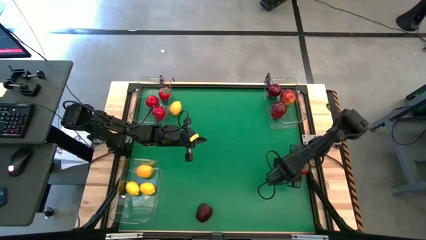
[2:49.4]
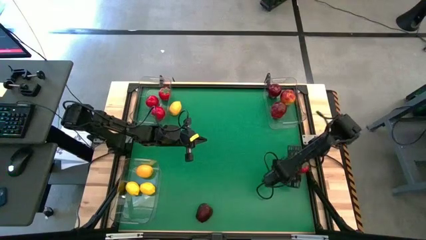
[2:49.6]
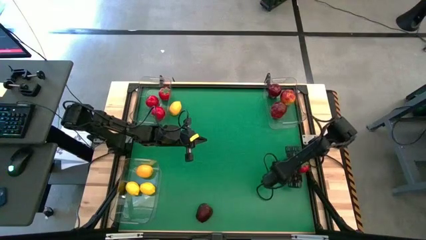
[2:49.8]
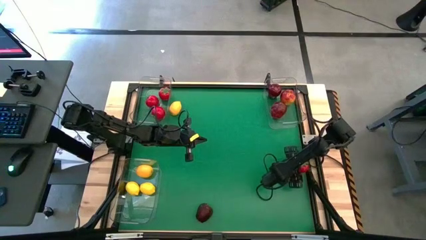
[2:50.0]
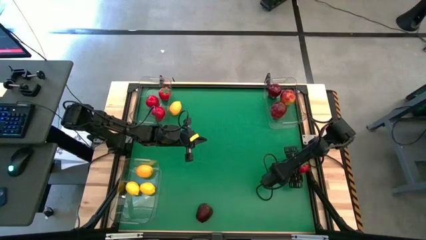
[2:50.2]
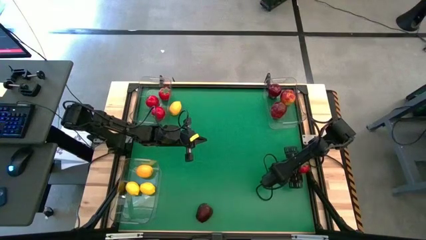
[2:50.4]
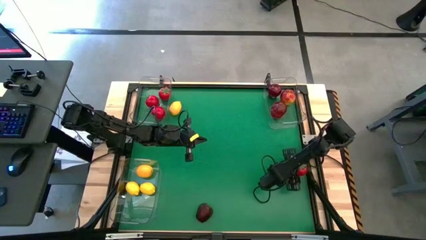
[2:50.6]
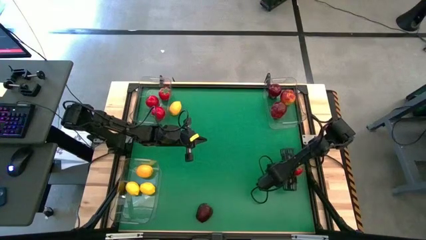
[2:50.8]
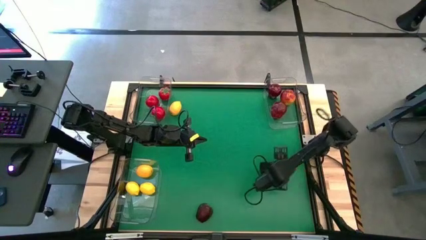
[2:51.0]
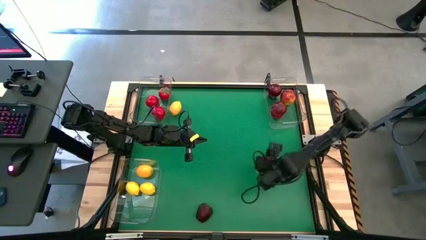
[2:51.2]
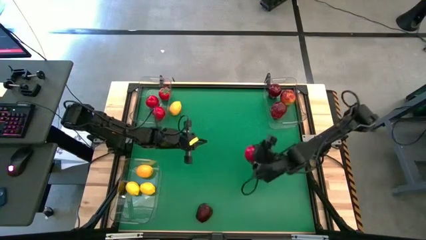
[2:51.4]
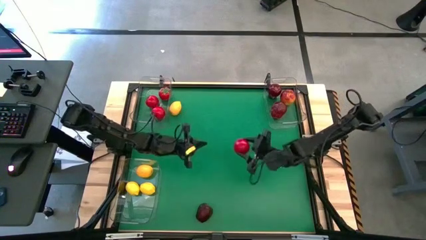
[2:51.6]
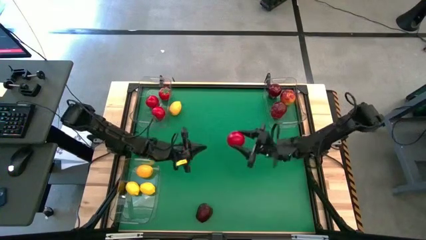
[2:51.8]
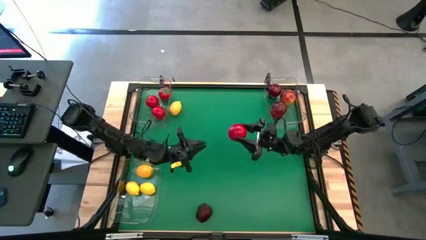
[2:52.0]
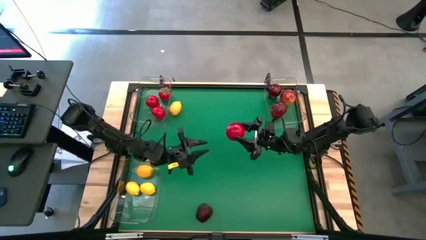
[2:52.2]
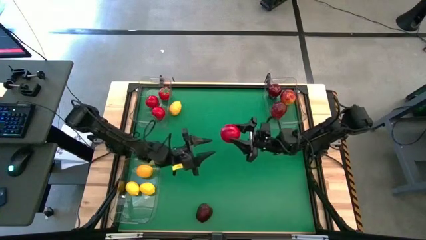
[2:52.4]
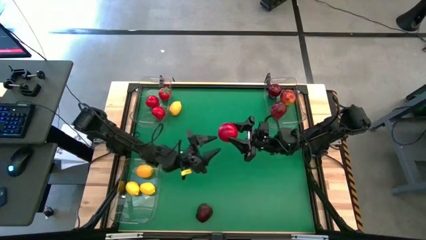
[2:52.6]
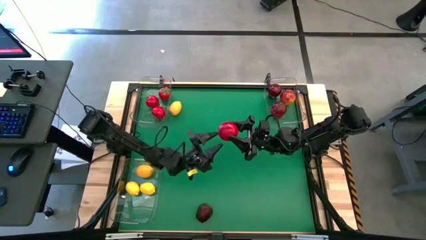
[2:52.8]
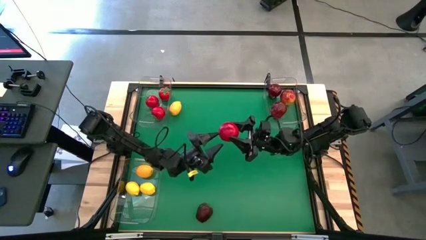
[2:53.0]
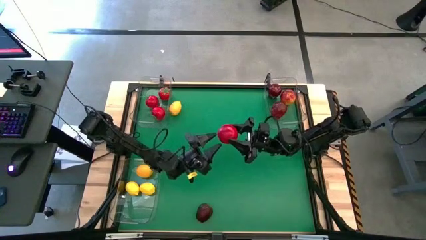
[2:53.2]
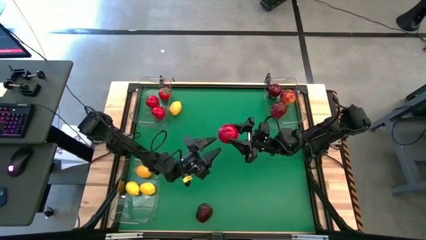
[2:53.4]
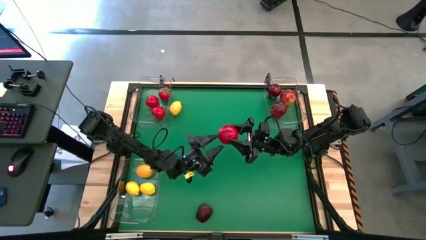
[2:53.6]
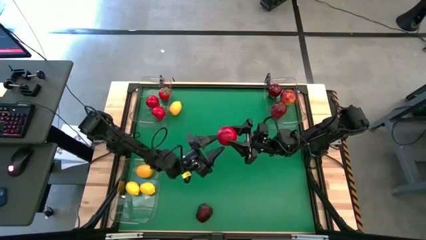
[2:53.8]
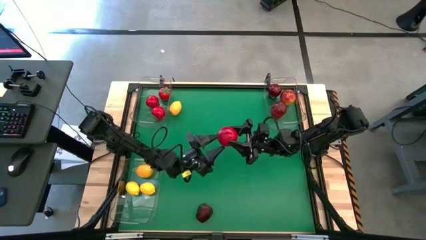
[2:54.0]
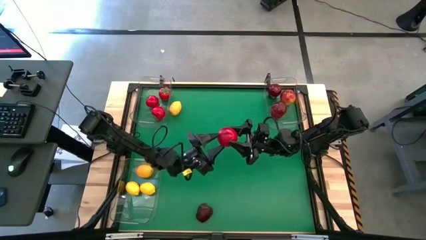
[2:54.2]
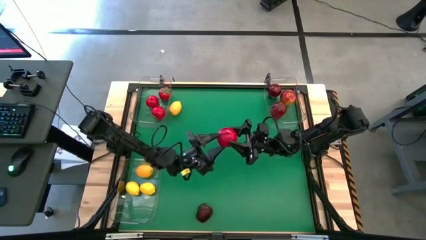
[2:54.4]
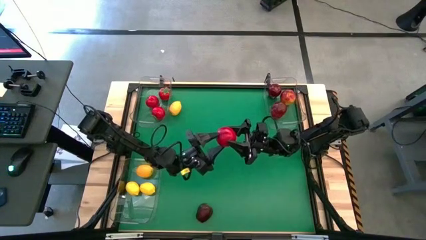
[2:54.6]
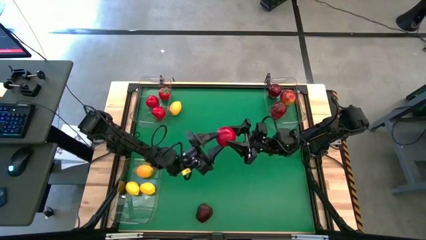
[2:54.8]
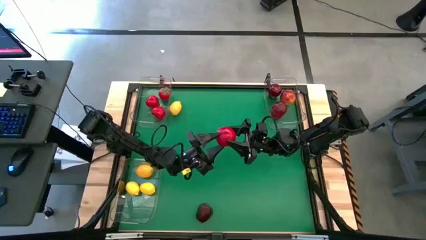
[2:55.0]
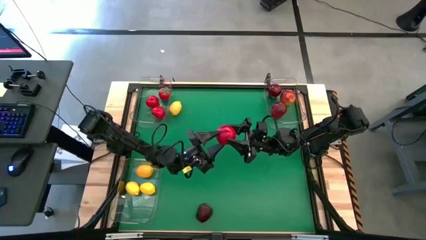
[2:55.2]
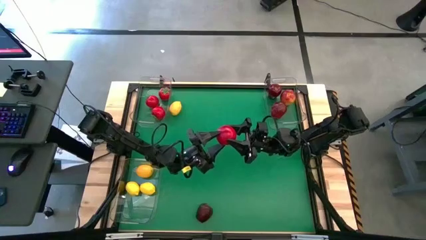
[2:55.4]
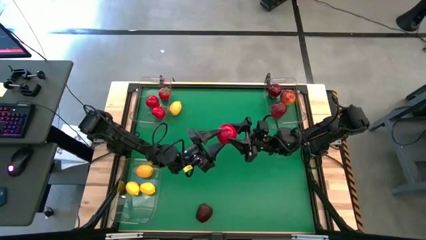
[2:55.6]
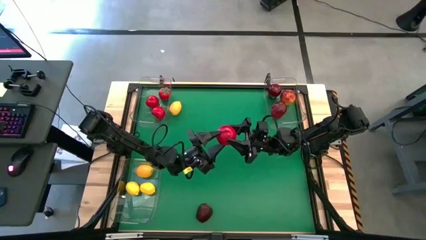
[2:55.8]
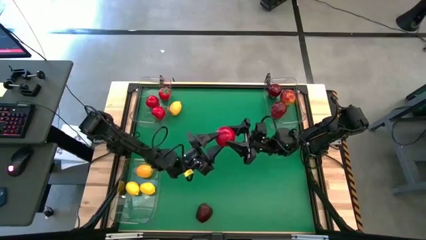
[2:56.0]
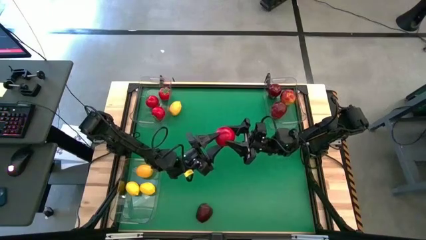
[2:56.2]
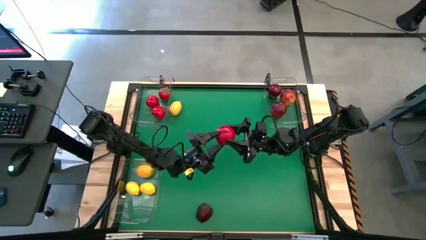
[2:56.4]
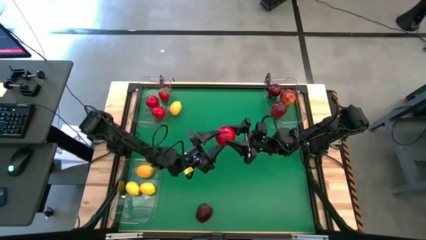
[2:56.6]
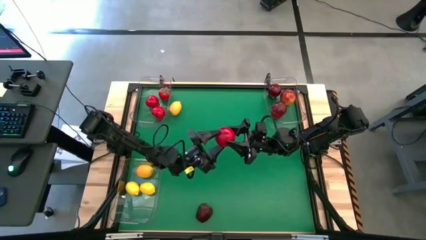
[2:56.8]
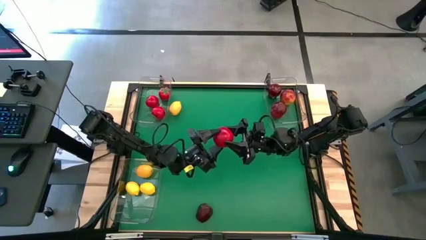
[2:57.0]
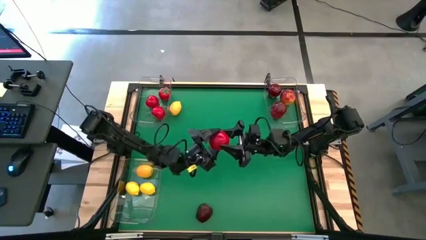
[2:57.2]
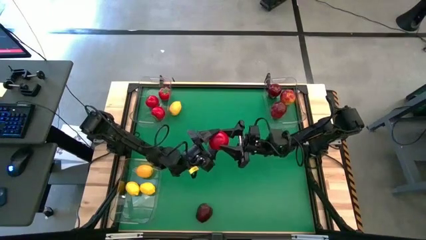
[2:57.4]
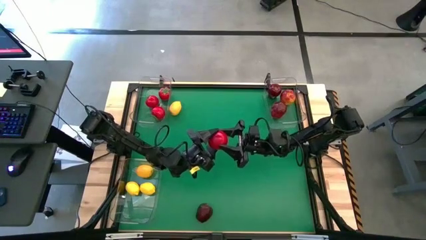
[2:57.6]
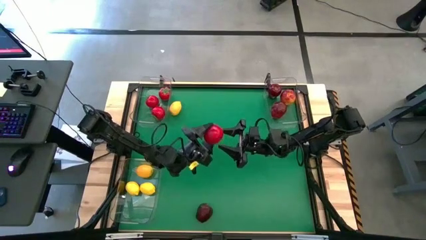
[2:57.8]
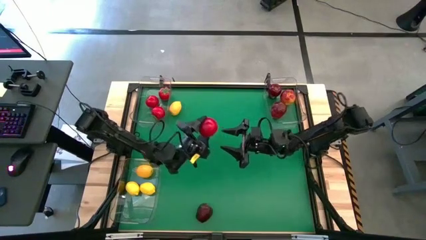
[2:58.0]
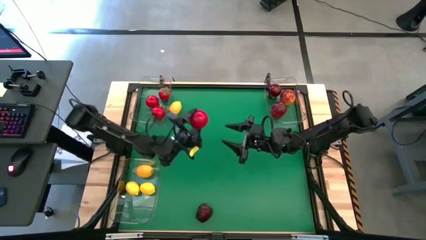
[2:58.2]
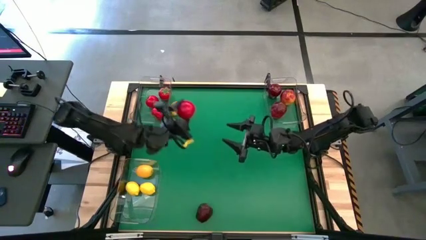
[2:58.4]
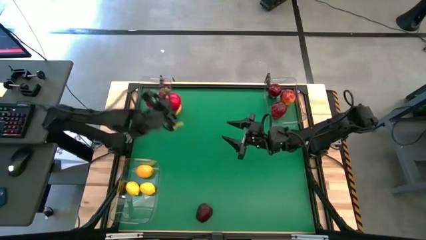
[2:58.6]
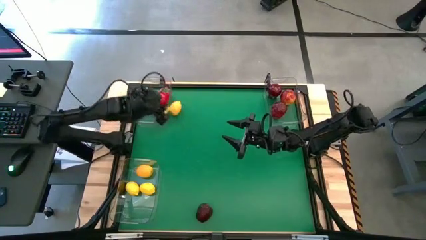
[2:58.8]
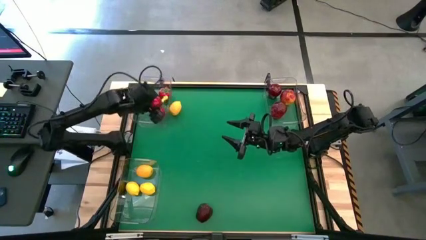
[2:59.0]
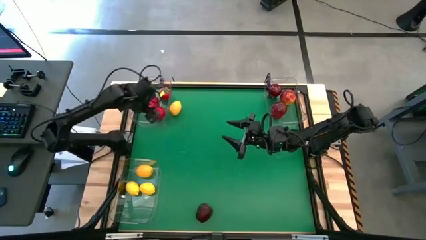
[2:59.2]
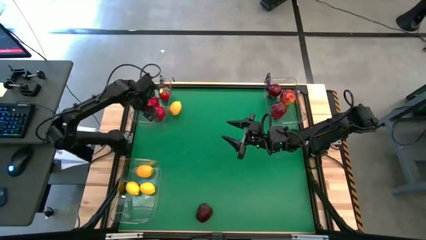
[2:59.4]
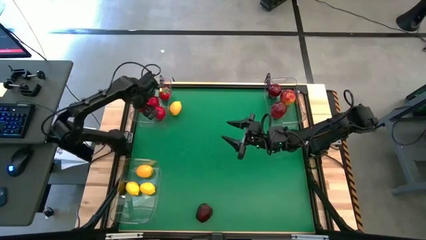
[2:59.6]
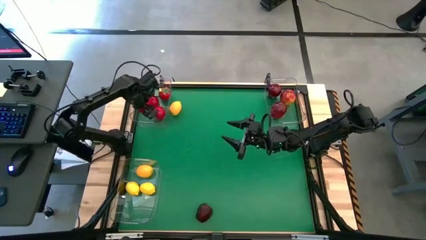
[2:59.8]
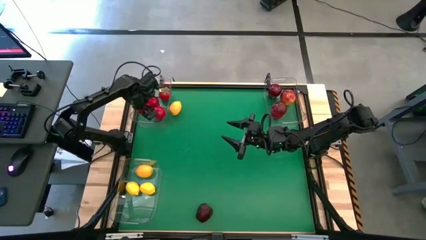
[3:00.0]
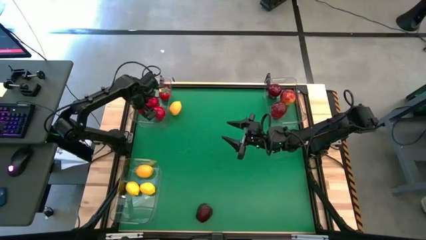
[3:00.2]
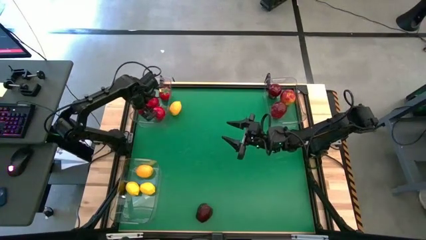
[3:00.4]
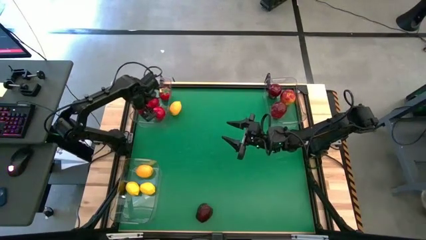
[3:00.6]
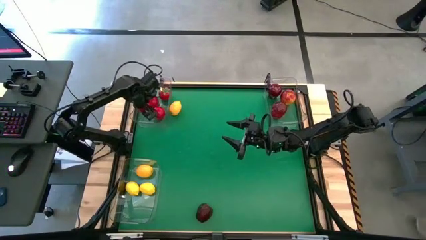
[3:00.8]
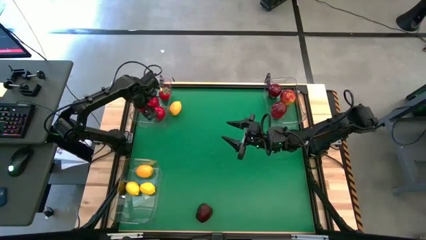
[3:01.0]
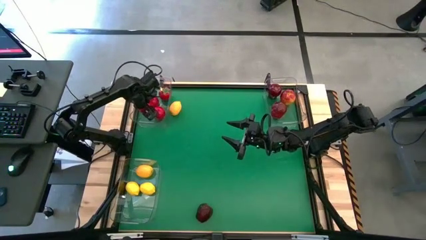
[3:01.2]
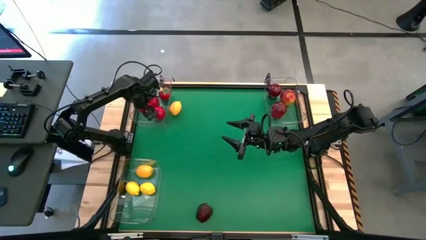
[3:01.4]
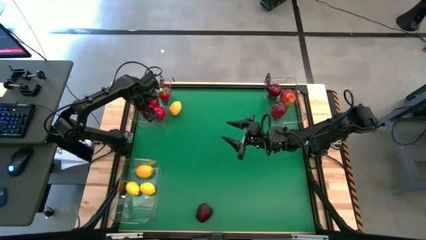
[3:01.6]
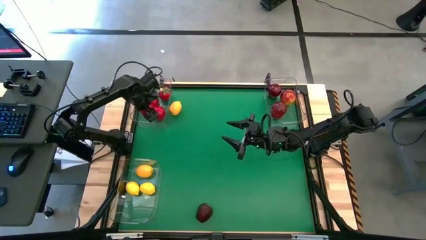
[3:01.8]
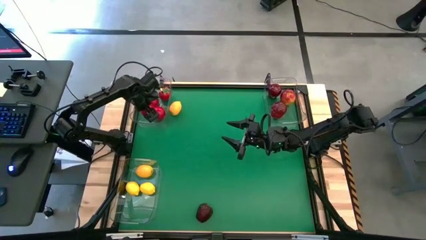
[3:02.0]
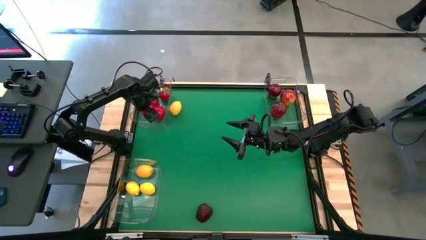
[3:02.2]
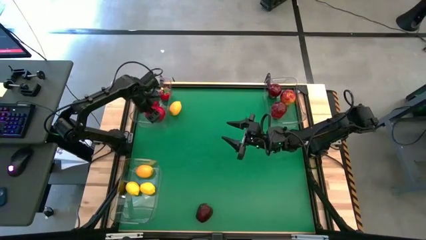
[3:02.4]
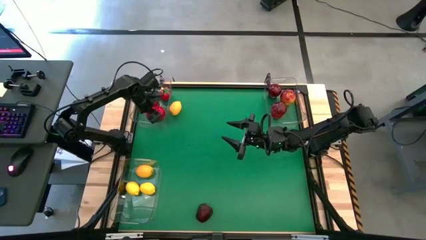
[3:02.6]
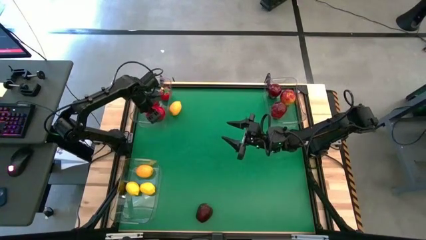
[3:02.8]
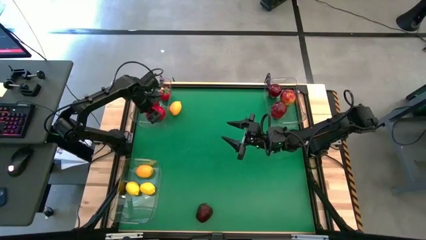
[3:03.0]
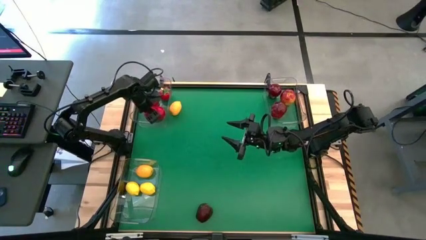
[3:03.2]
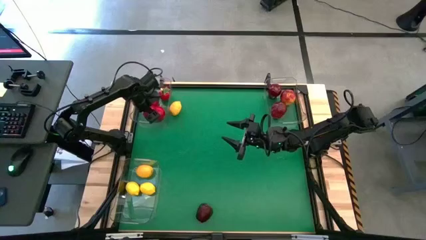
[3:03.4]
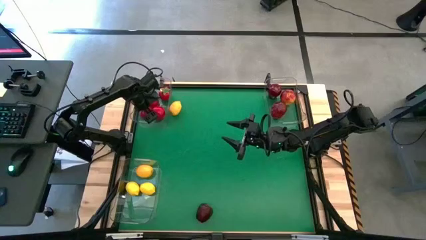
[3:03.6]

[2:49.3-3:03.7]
Task: Sort produce into baskets
Put the tomato into the top left bin

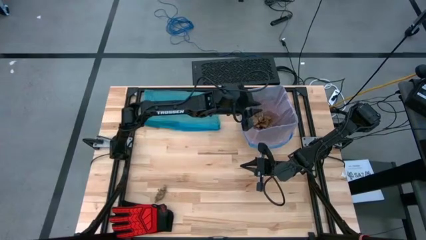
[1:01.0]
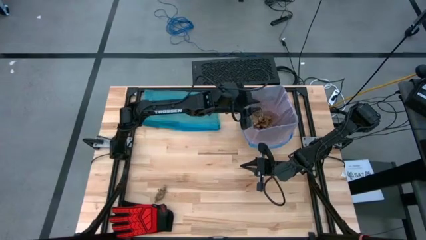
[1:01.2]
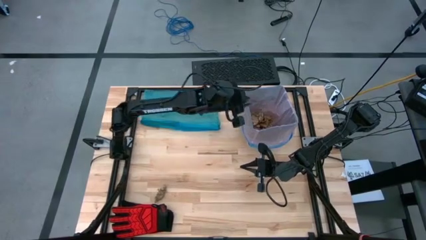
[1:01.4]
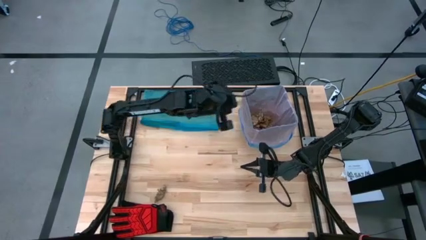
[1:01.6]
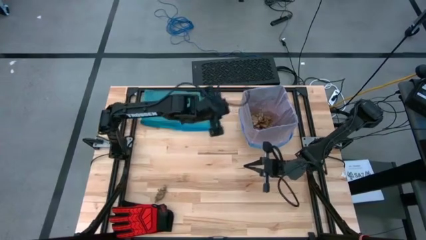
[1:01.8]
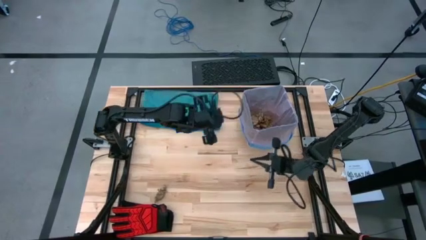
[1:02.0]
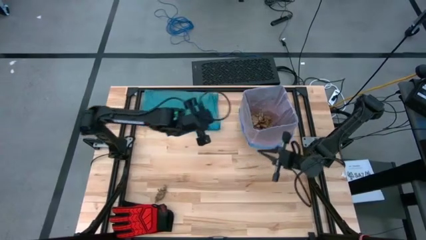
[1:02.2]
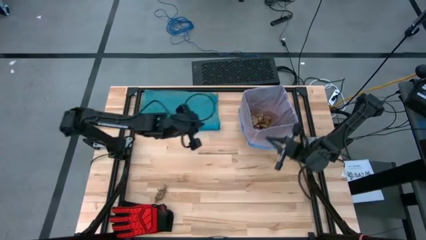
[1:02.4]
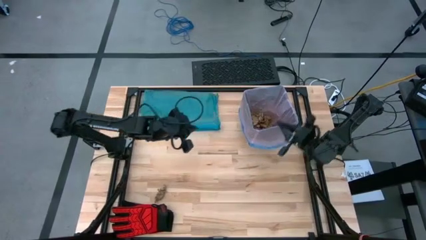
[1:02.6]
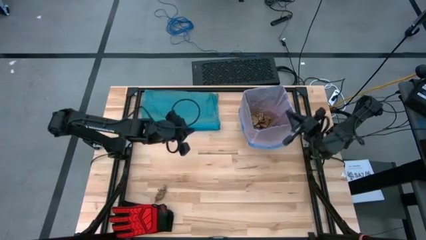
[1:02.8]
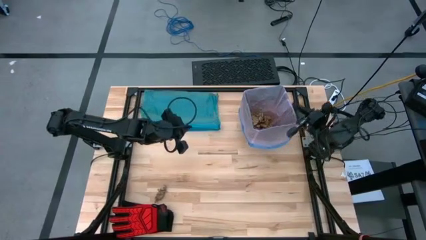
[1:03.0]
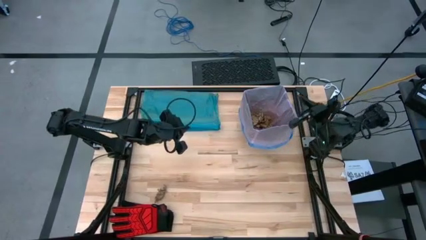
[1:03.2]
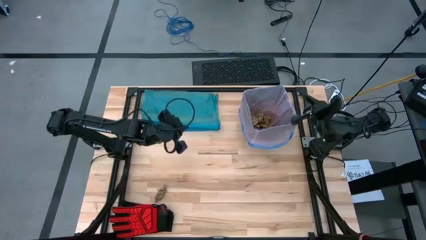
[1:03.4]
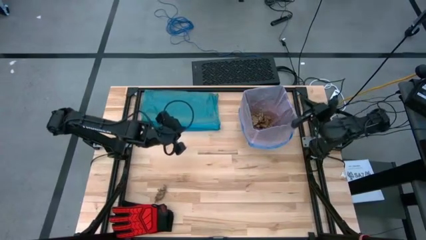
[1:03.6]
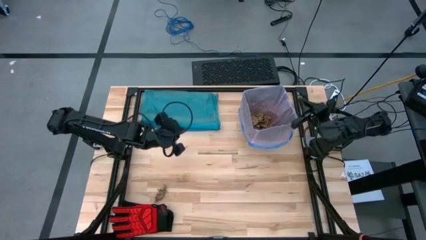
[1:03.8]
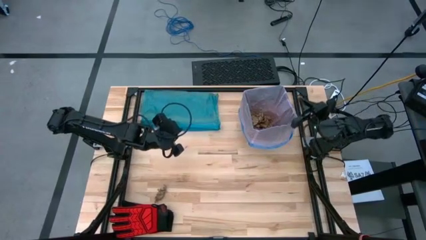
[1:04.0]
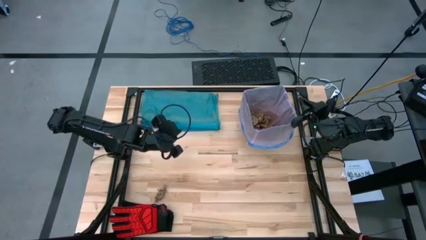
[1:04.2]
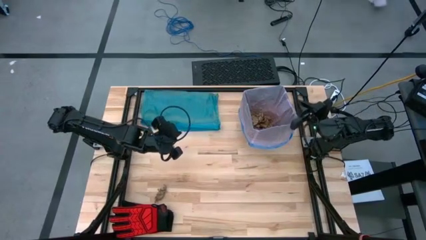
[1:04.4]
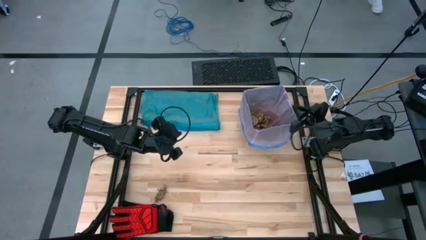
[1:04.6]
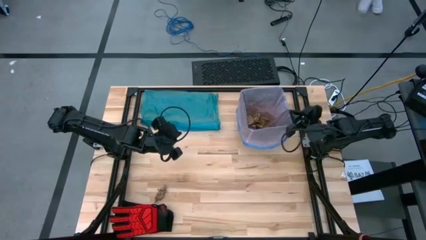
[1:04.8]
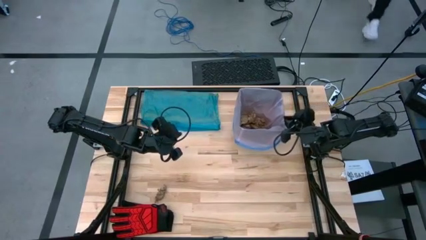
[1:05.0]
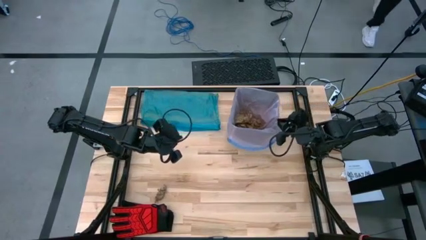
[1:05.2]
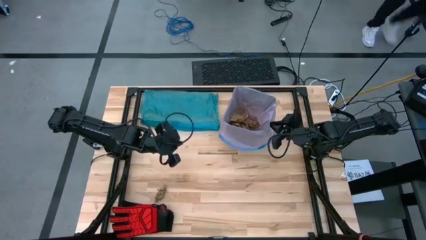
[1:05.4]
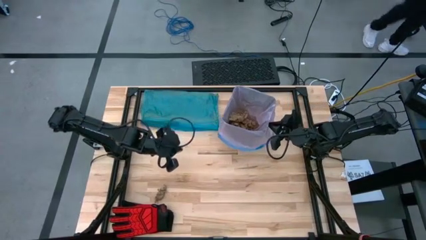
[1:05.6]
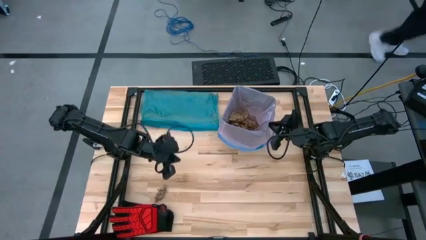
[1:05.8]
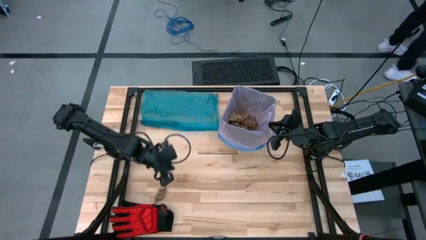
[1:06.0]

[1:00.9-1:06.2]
Task: place trash/remove bag and relplace
Move the trash bin to the right
